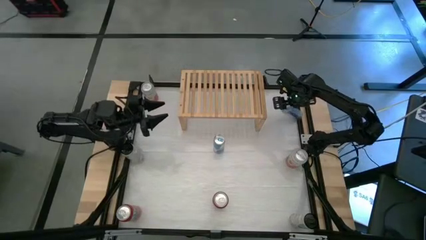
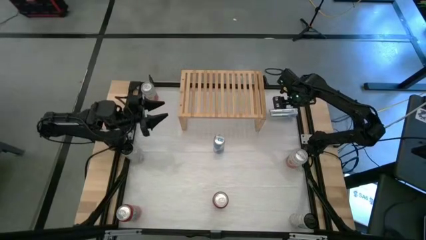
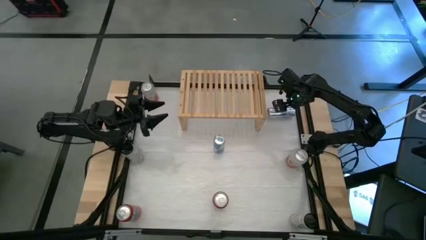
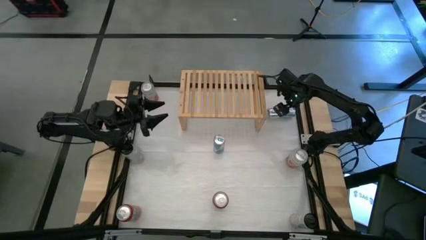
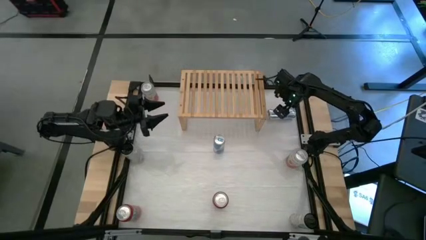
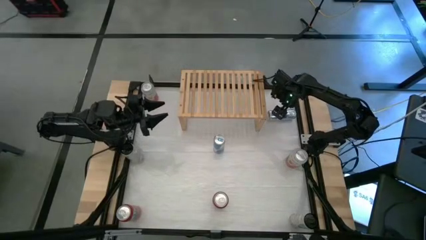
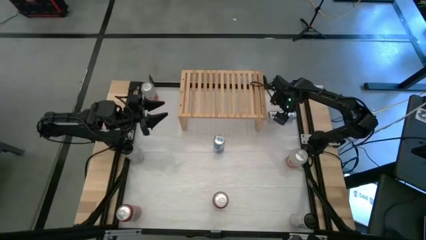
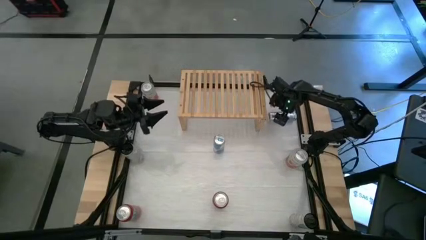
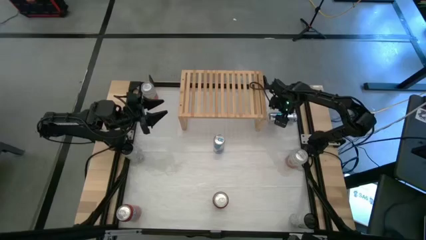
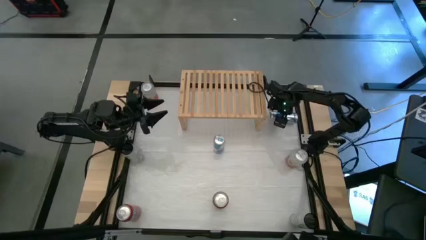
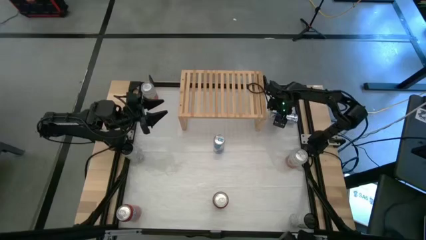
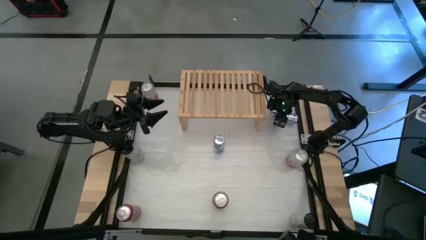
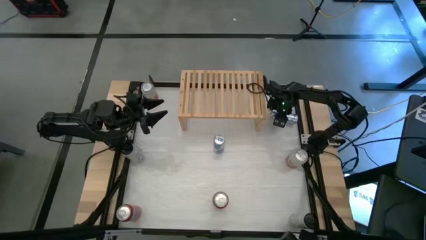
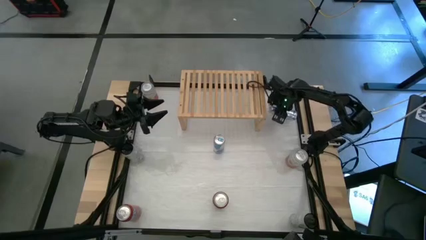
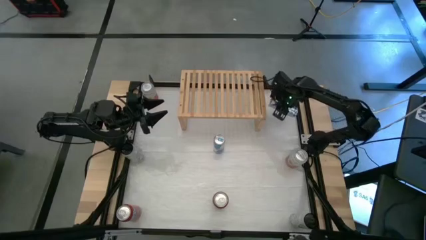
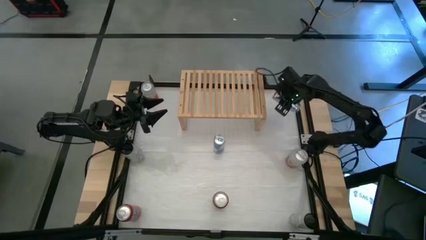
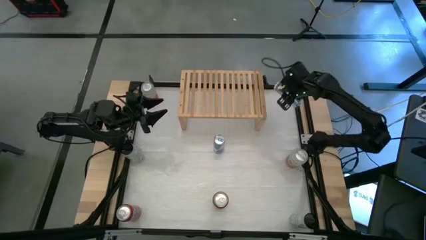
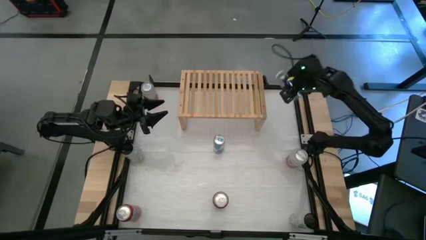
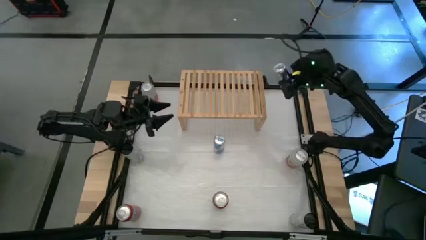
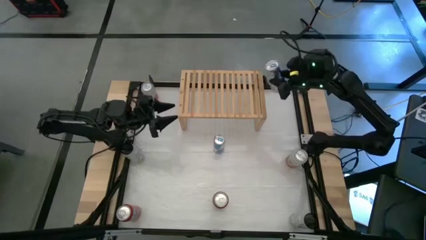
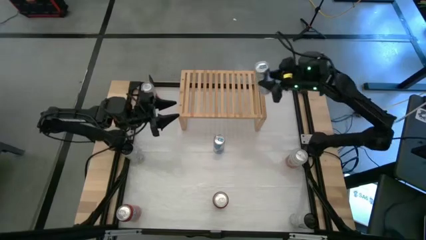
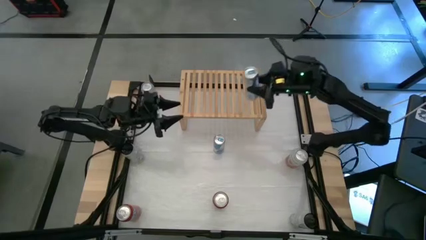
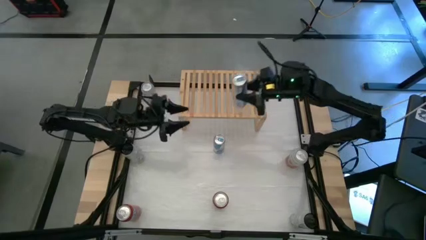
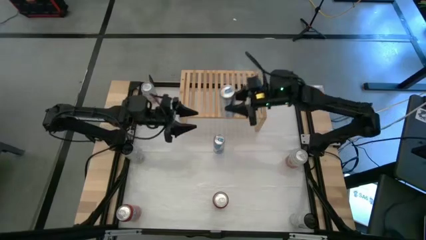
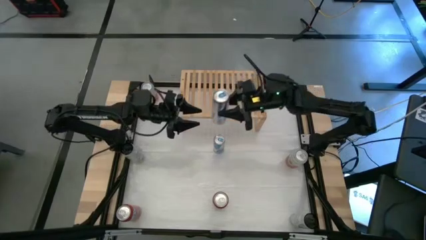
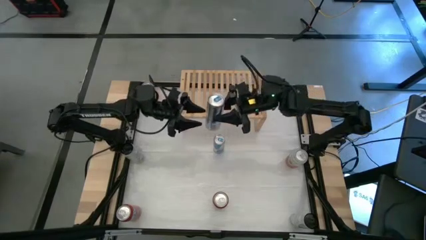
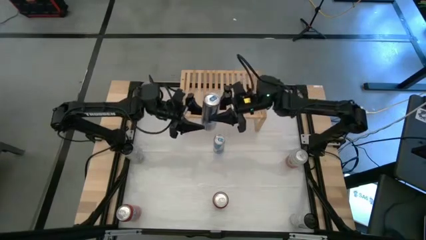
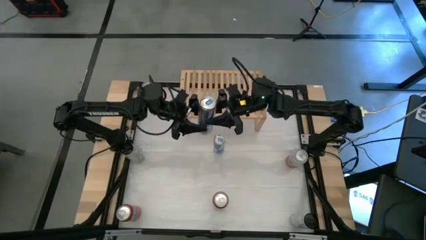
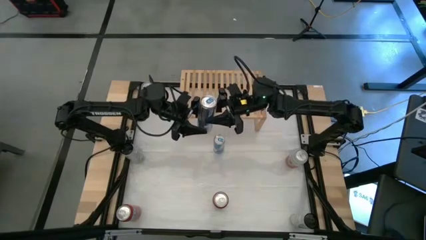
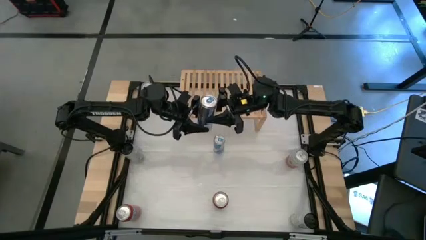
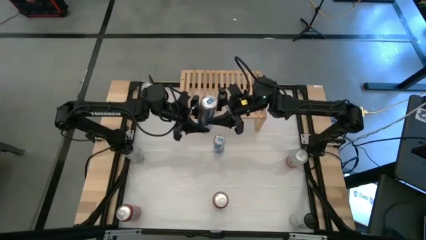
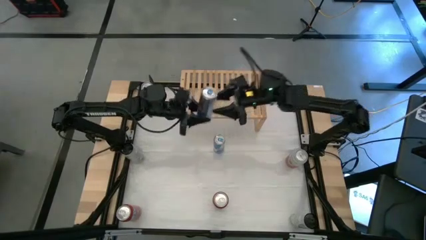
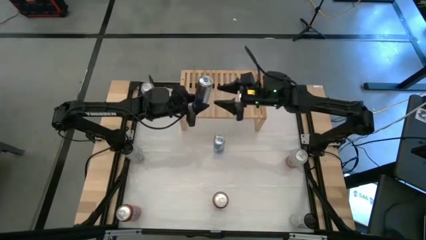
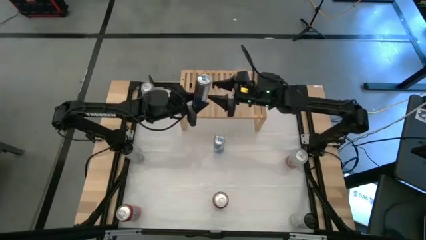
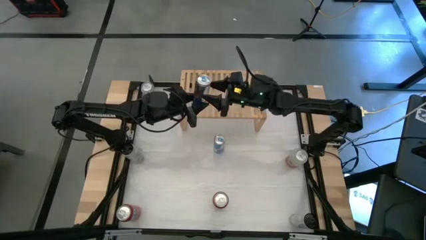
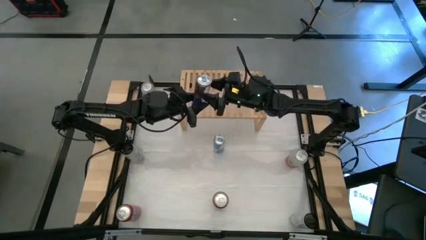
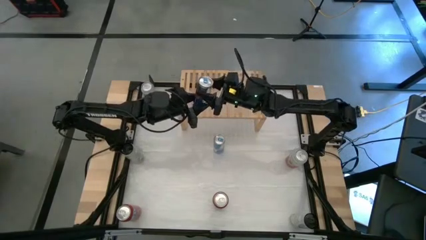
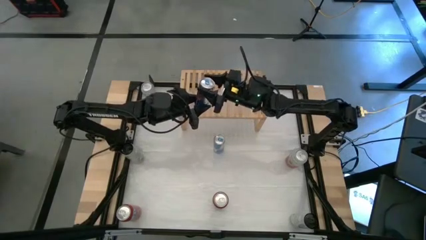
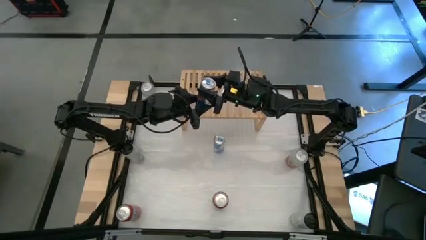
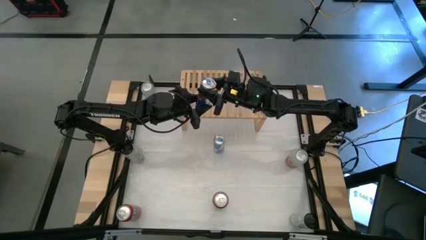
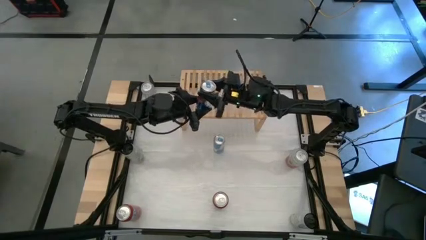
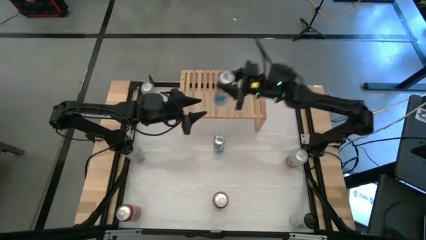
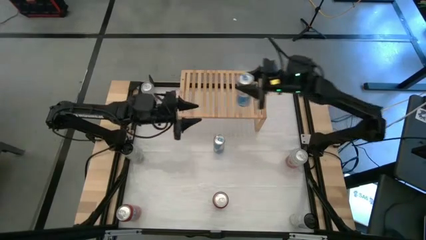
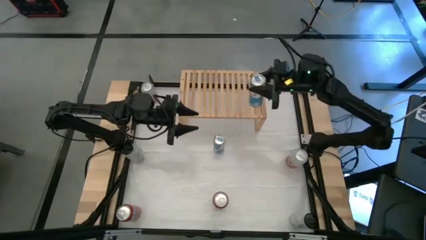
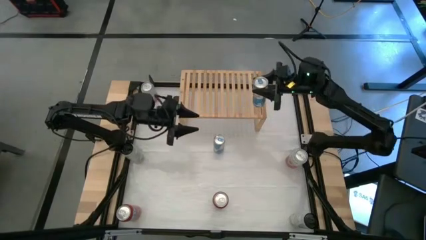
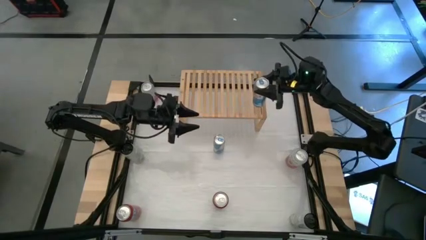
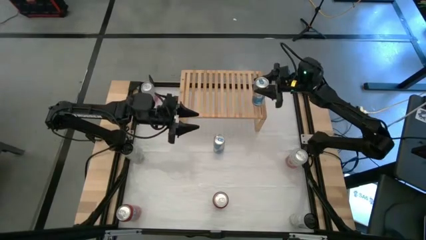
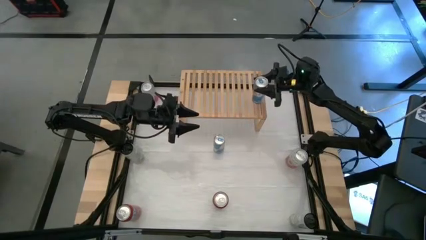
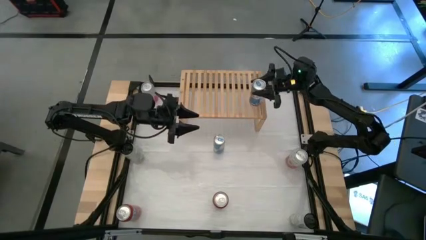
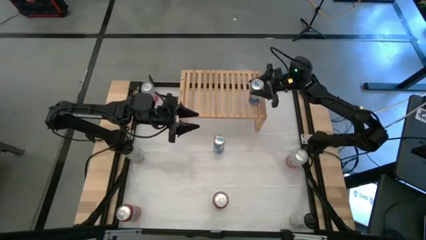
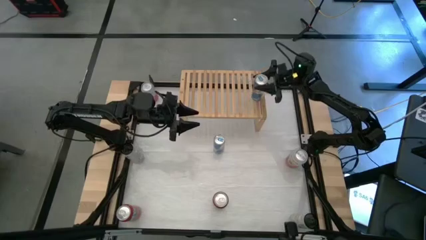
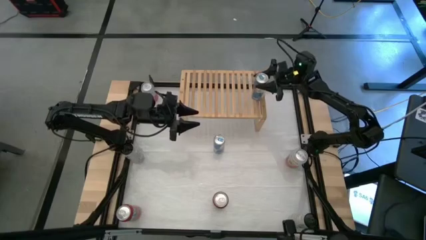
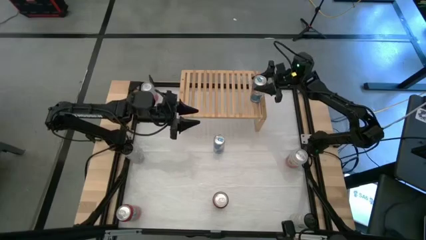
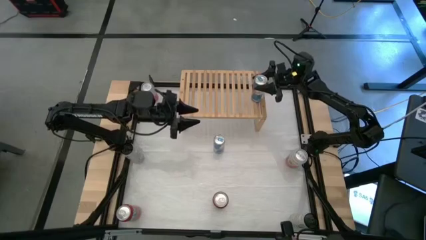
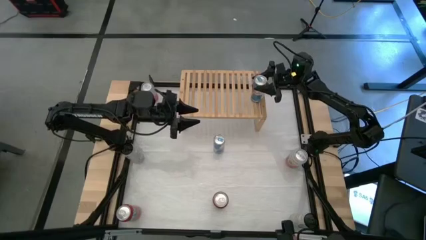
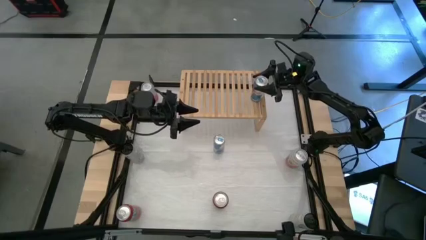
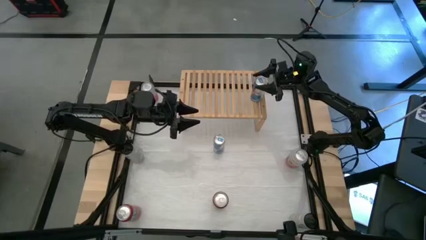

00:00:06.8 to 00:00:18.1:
Task: Place canned beverage on shelf
Put the top blue soda can on the shelf
